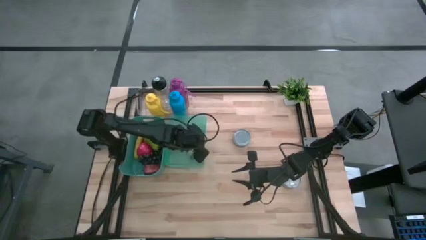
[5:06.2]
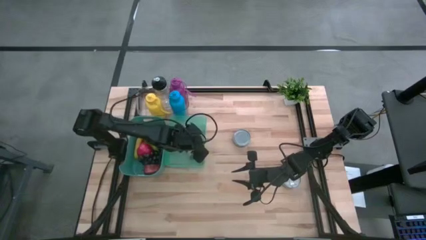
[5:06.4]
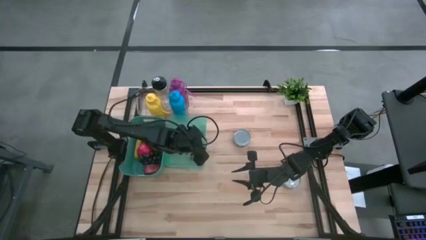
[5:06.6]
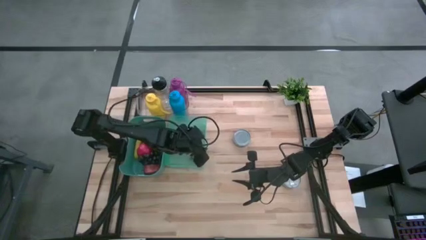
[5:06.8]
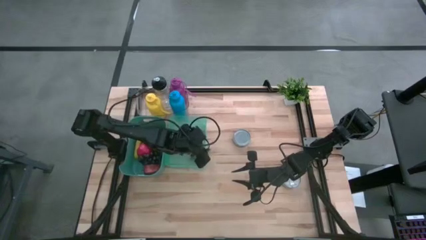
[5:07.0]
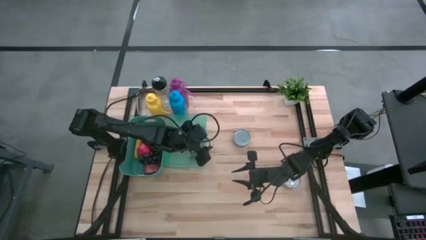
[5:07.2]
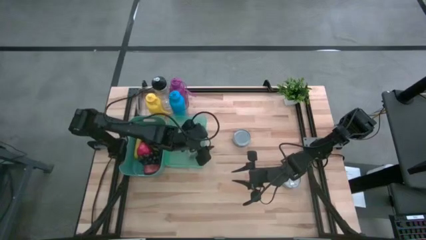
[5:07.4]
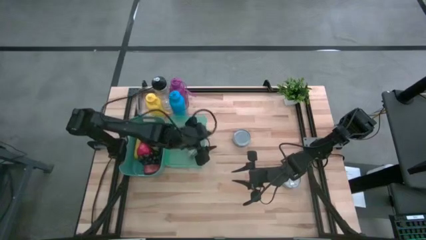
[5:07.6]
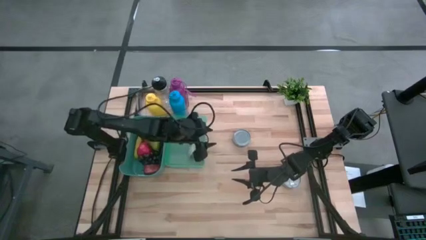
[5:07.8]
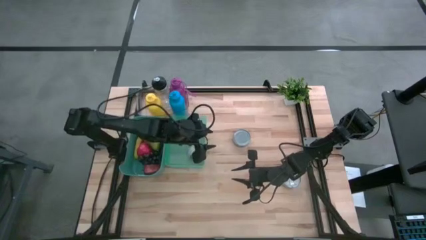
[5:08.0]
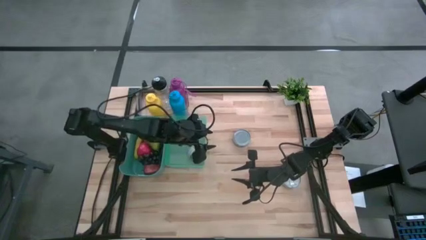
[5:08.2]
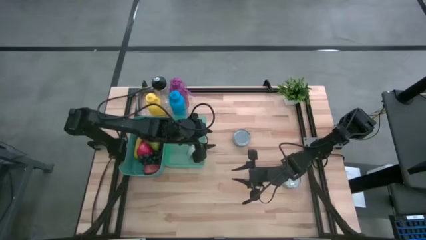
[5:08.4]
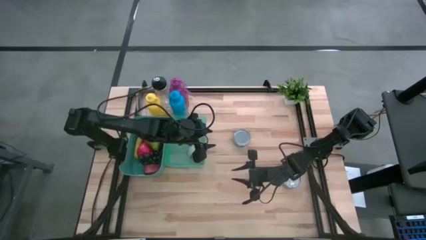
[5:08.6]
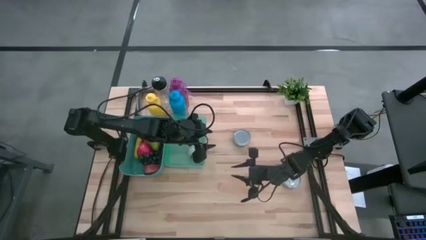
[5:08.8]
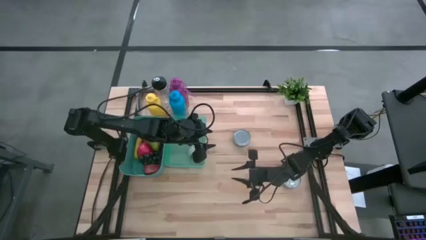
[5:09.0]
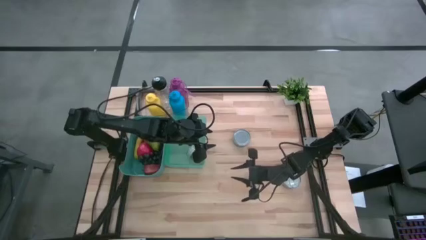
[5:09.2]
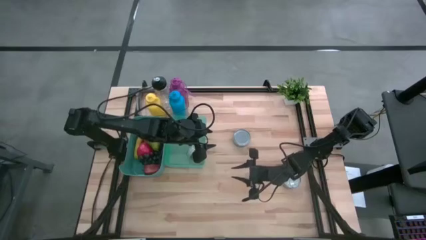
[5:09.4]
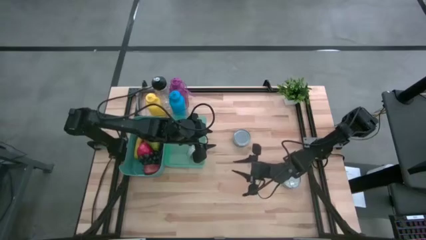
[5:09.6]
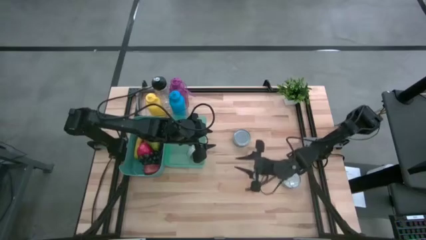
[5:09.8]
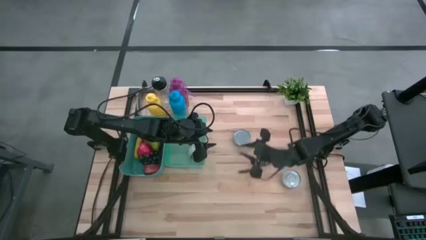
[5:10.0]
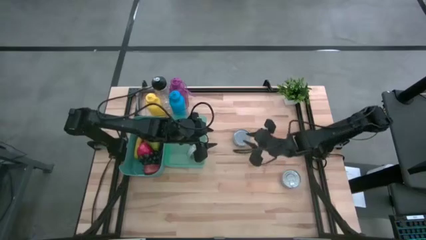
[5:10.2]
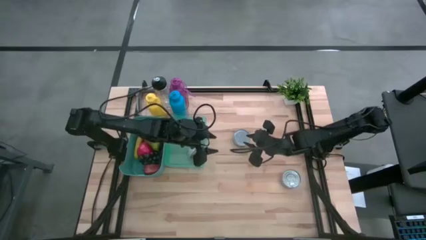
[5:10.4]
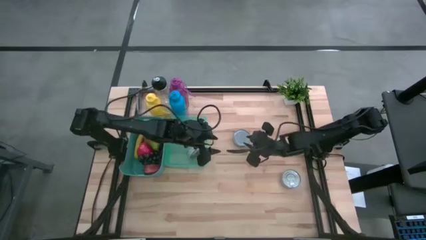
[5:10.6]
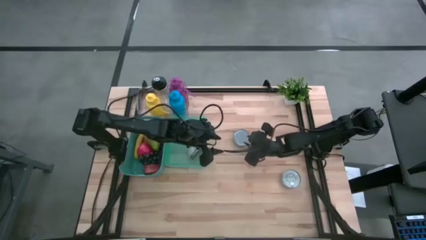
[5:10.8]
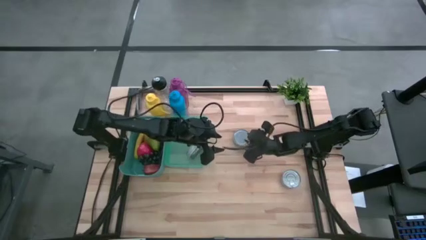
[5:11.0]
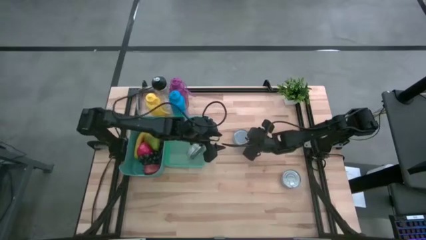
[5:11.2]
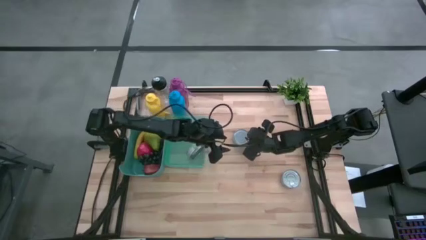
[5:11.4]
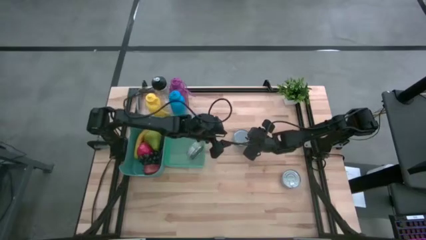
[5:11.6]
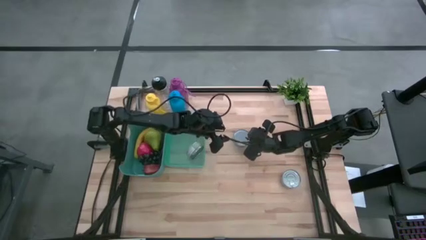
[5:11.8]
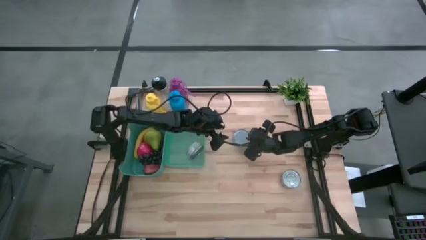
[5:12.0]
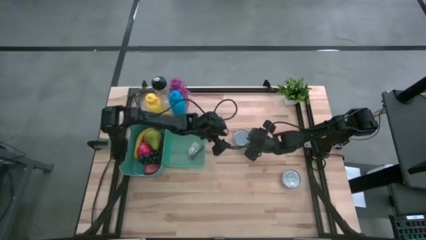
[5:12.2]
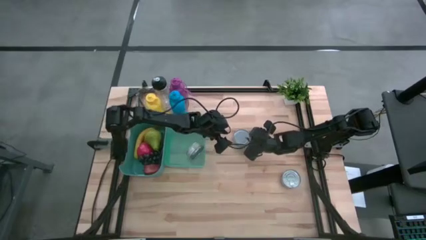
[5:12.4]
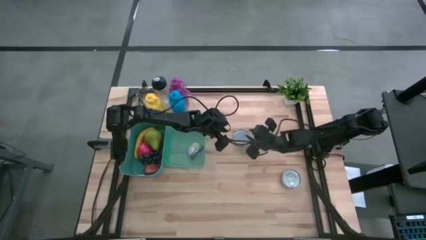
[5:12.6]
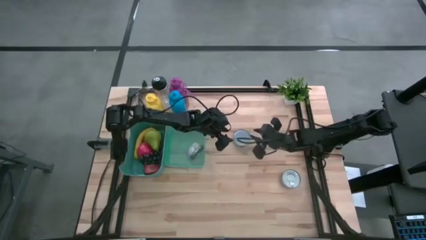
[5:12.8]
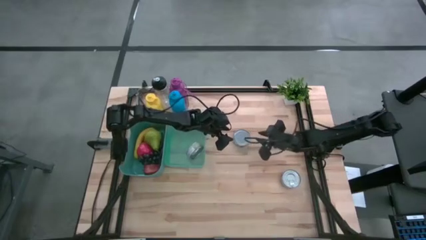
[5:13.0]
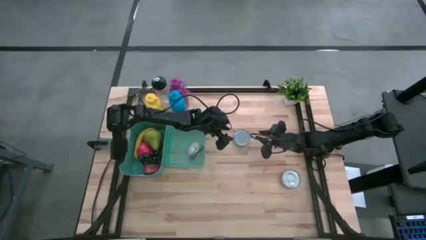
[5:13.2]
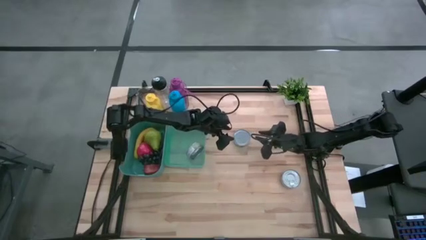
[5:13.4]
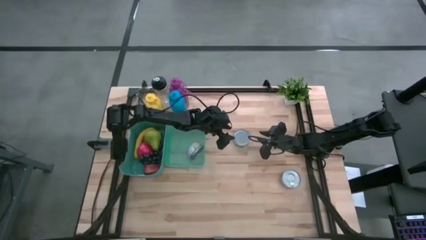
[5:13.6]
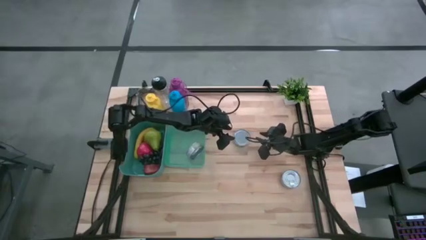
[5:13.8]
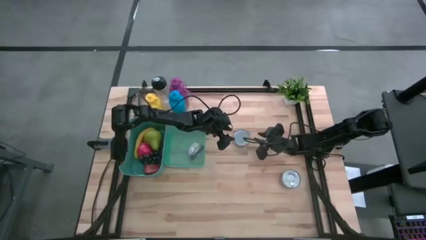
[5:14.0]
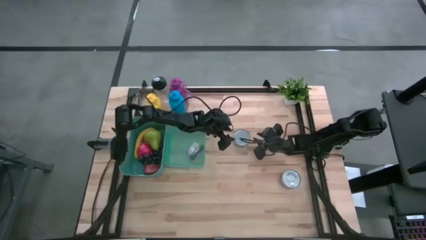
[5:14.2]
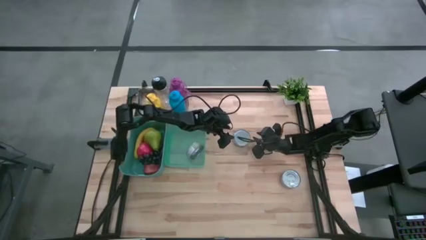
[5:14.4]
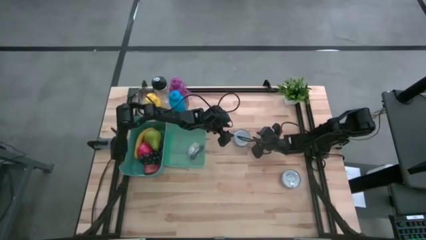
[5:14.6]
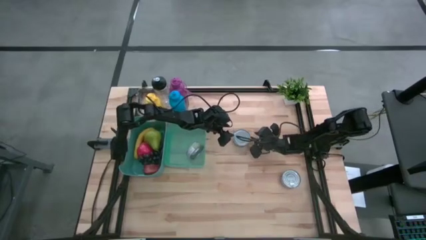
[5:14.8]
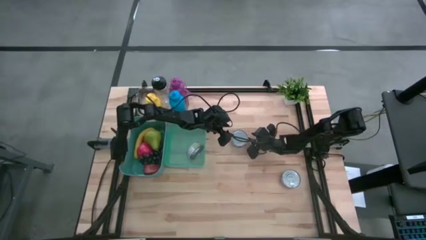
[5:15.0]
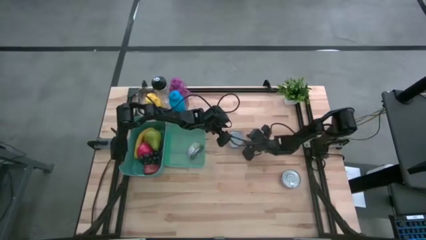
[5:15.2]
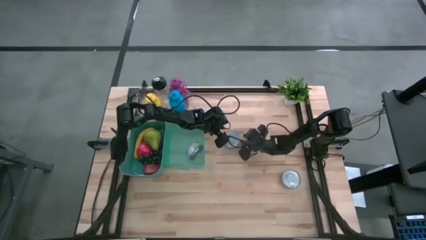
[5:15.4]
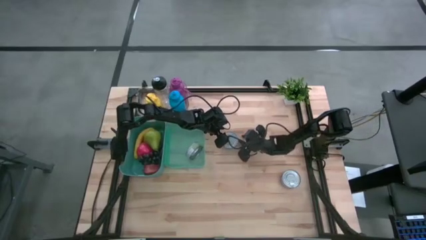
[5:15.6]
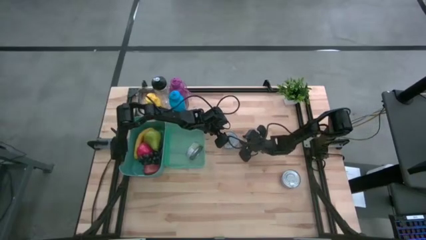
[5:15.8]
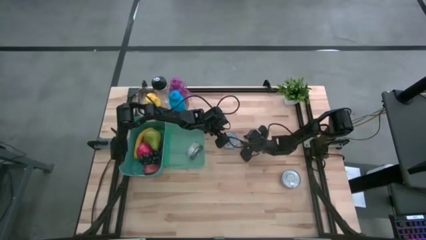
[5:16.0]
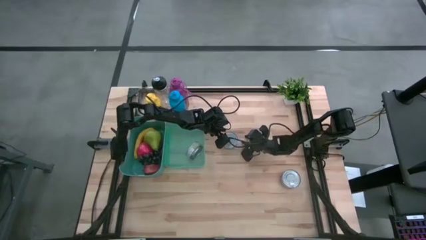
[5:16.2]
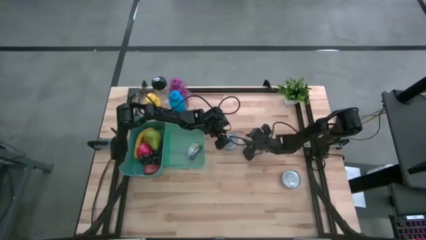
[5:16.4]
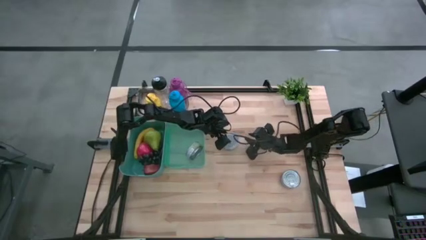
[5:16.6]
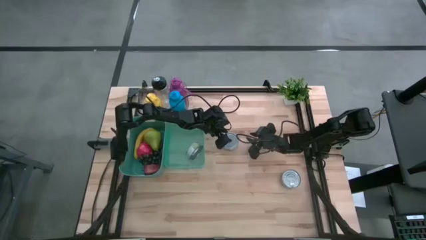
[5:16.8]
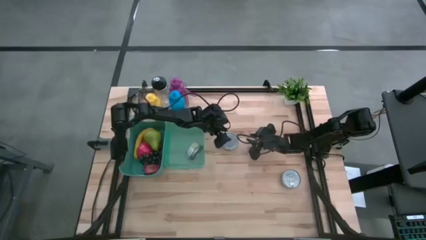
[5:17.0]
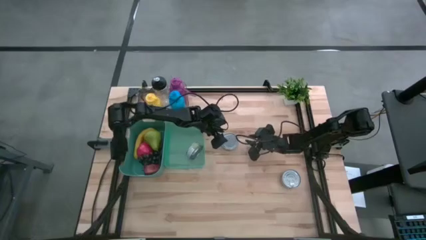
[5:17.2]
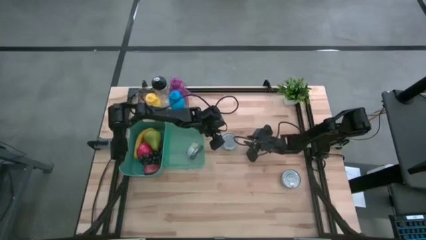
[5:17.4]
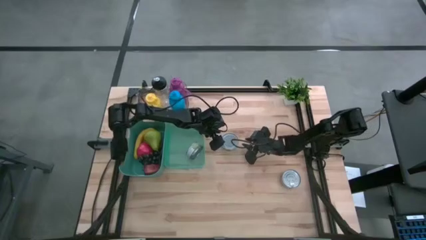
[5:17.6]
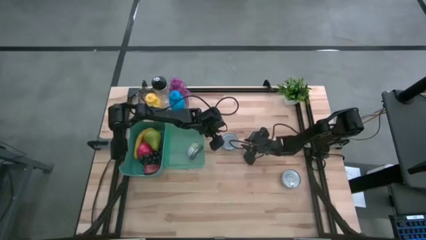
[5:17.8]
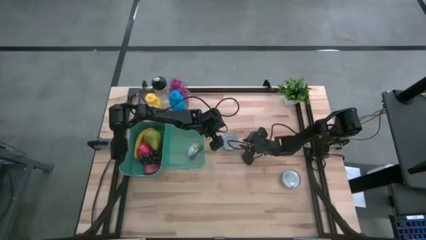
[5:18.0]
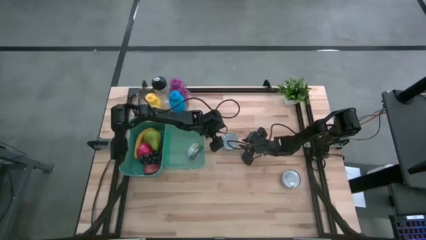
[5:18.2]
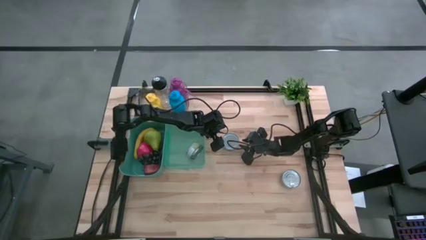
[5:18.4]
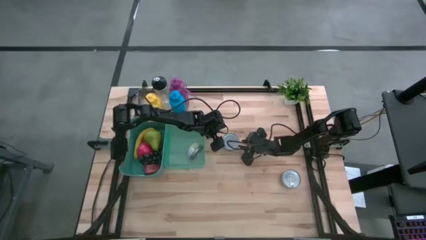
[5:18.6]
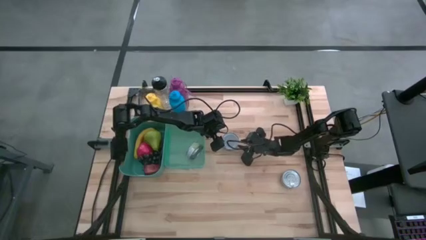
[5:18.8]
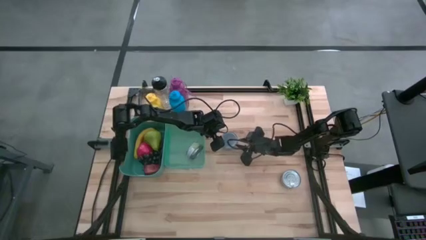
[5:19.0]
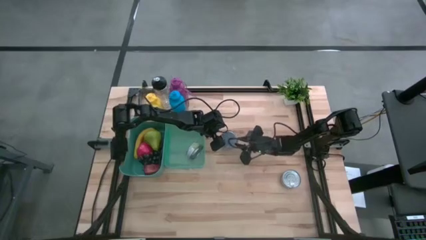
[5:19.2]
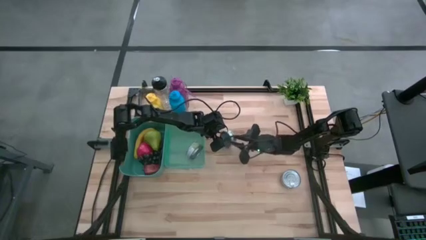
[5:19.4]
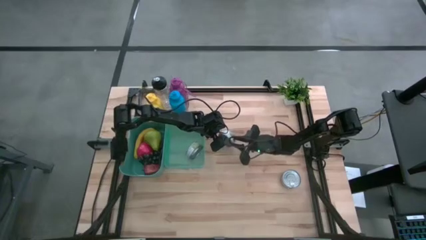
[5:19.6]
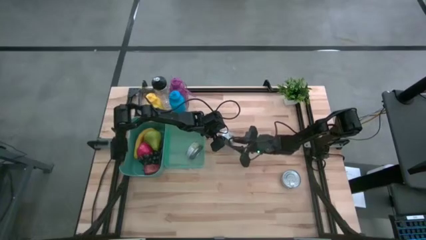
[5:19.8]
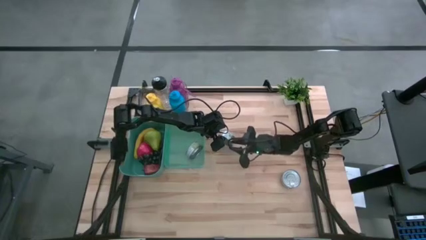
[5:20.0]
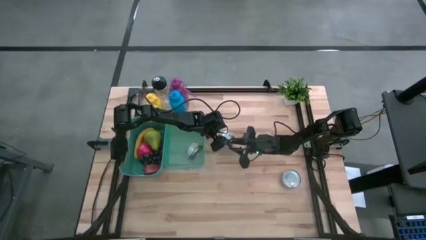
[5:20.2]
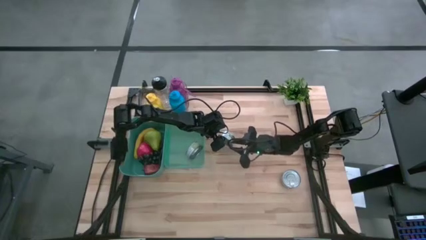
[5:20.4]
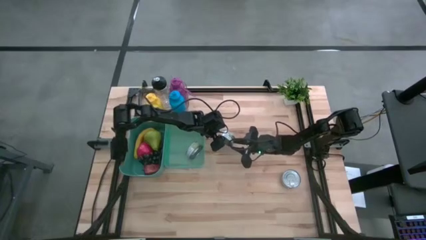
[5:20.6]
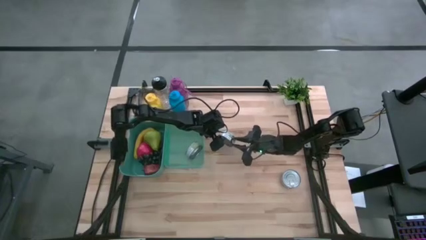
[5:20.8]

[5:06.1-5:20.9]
Task: Pick & Place Food Item
Put the green tuna can into the light green bin
